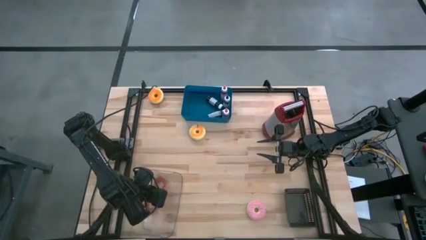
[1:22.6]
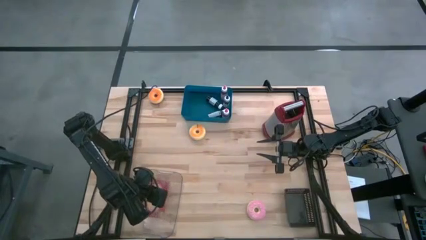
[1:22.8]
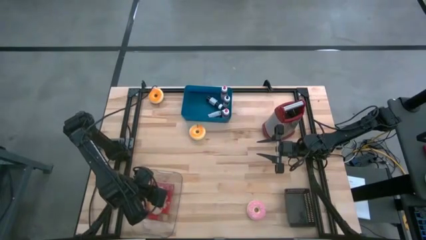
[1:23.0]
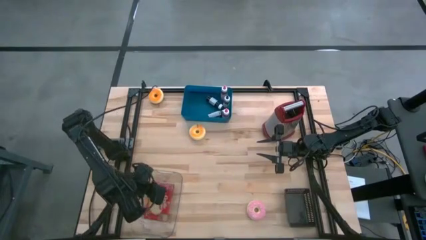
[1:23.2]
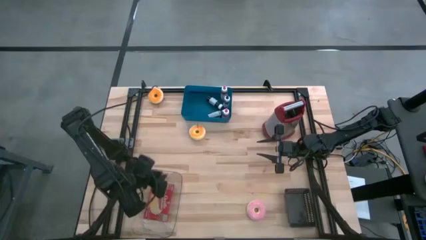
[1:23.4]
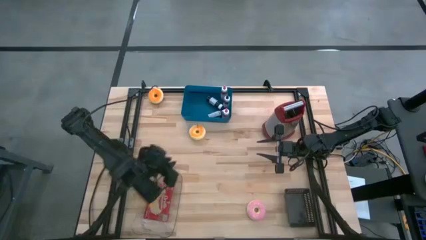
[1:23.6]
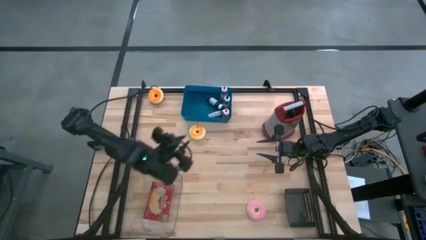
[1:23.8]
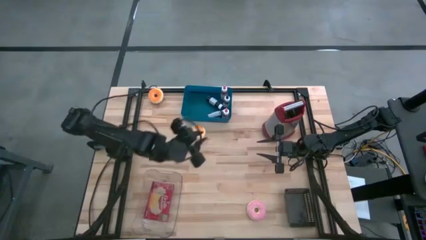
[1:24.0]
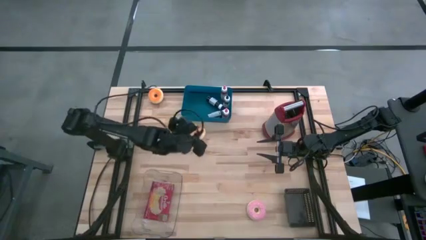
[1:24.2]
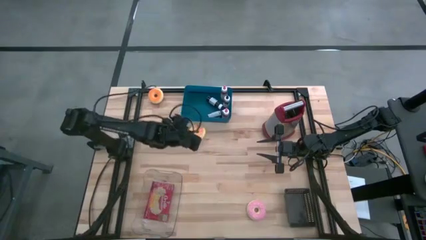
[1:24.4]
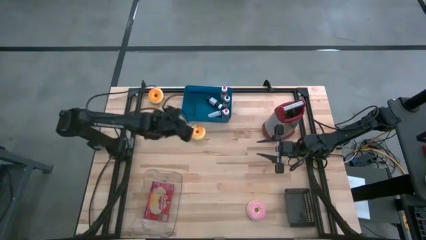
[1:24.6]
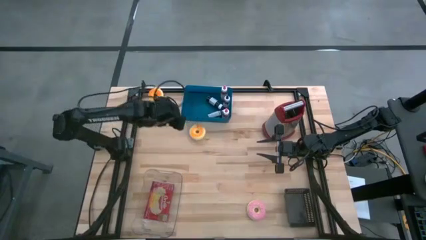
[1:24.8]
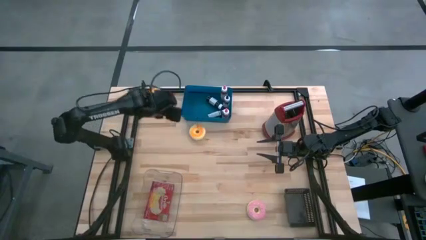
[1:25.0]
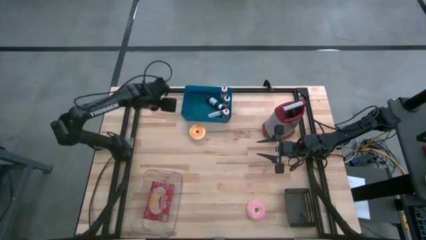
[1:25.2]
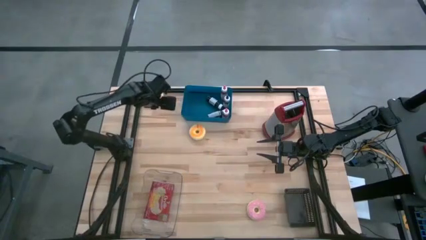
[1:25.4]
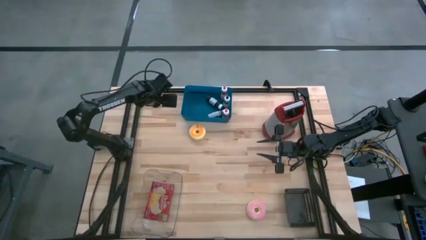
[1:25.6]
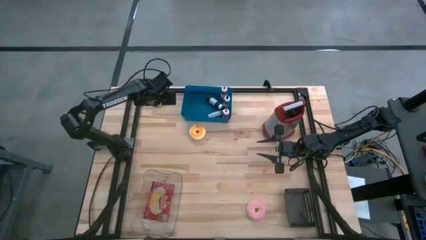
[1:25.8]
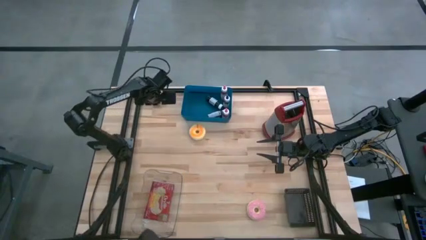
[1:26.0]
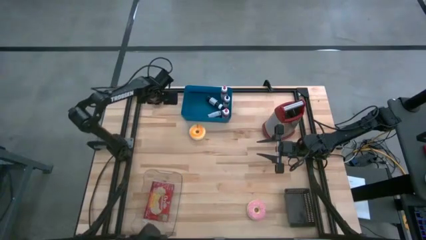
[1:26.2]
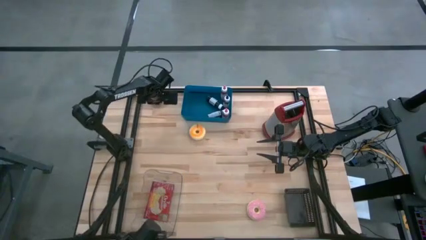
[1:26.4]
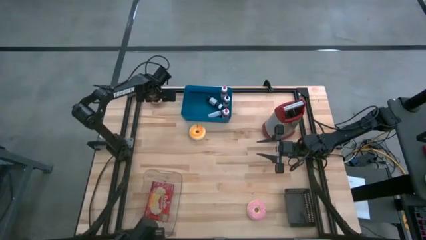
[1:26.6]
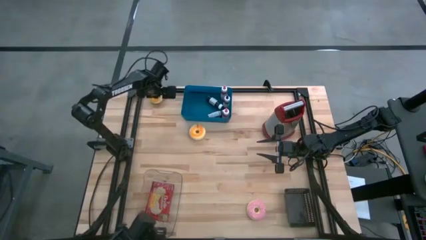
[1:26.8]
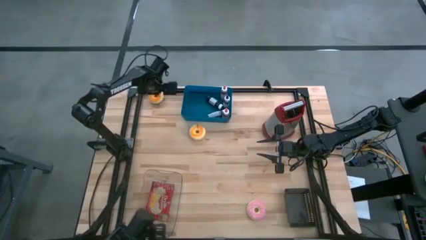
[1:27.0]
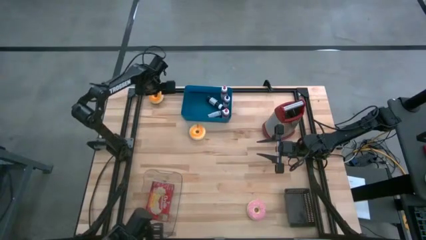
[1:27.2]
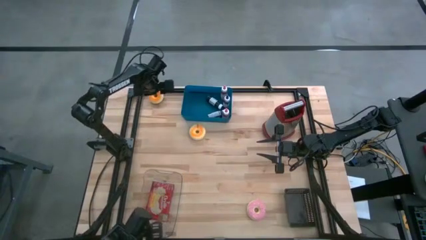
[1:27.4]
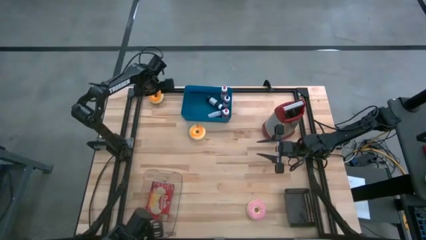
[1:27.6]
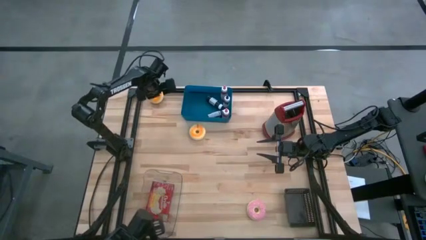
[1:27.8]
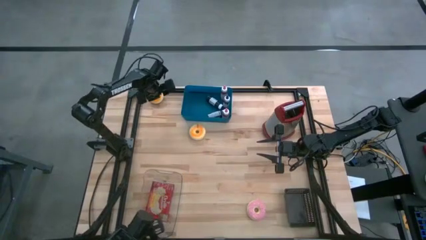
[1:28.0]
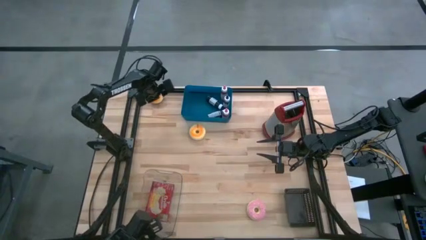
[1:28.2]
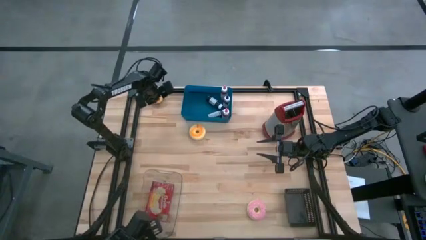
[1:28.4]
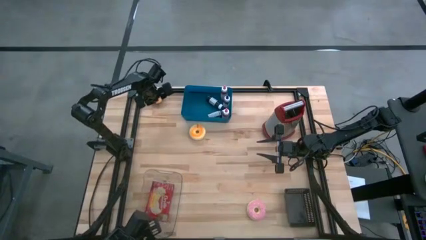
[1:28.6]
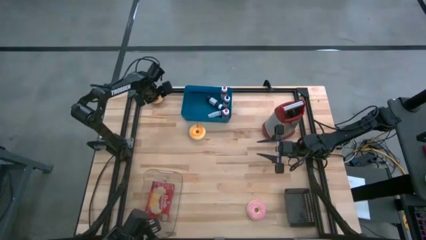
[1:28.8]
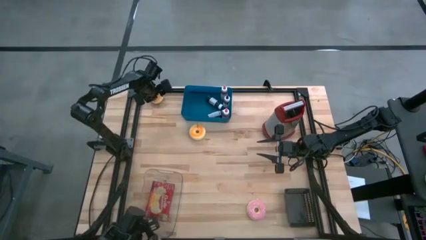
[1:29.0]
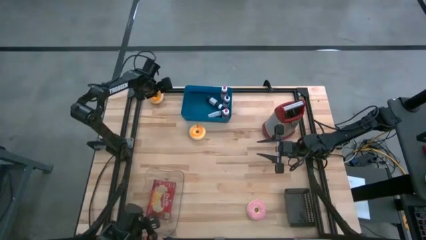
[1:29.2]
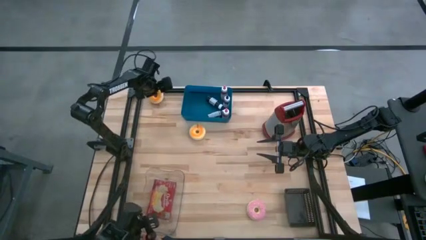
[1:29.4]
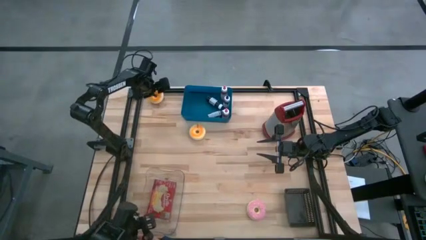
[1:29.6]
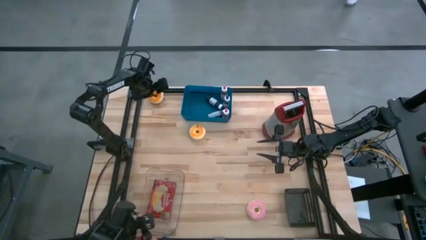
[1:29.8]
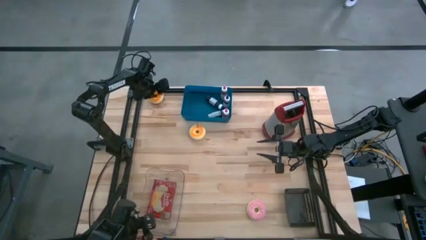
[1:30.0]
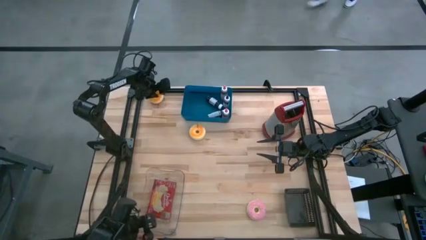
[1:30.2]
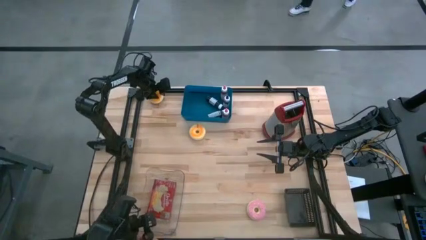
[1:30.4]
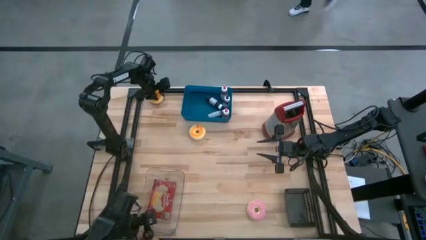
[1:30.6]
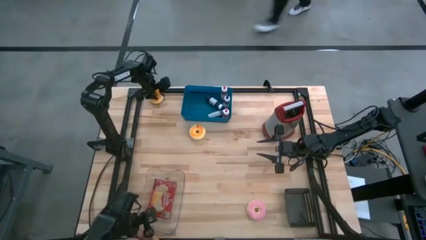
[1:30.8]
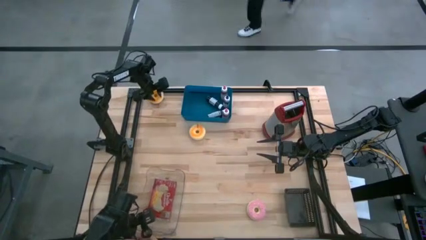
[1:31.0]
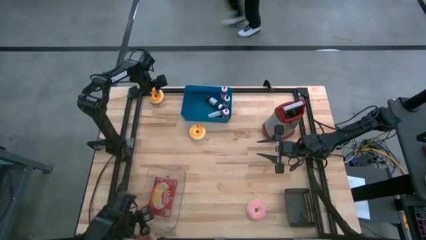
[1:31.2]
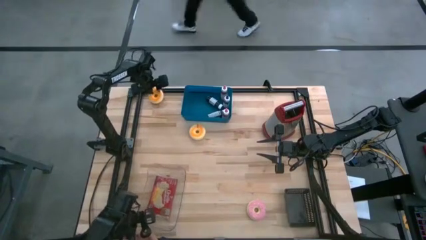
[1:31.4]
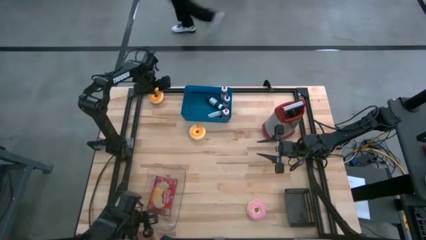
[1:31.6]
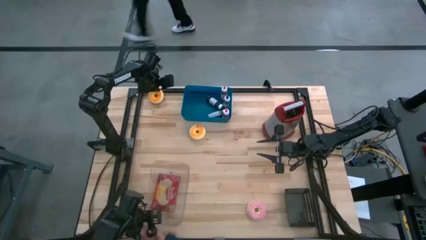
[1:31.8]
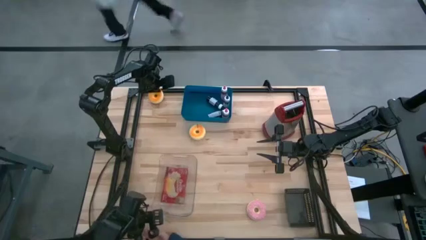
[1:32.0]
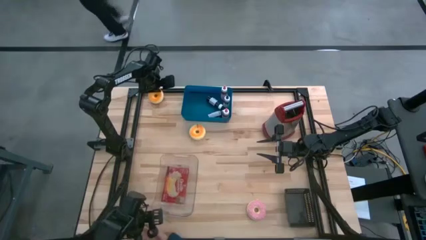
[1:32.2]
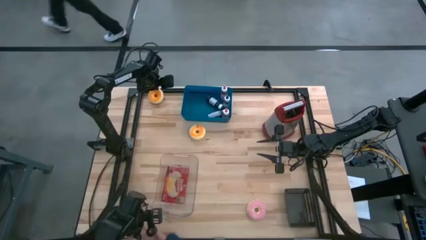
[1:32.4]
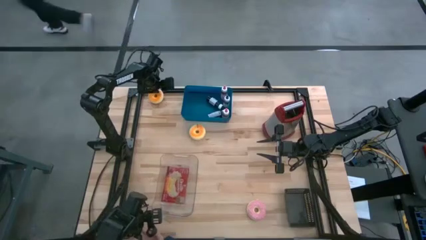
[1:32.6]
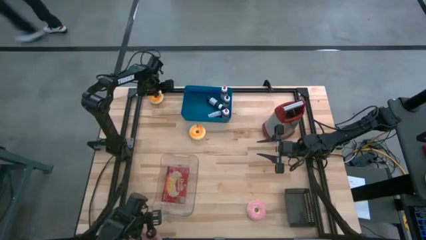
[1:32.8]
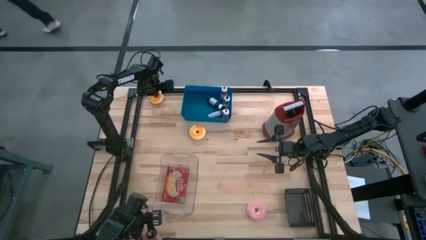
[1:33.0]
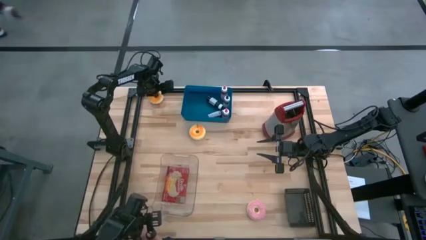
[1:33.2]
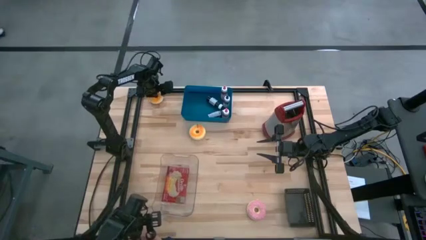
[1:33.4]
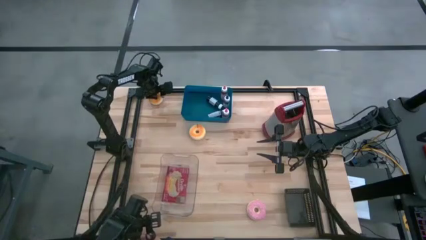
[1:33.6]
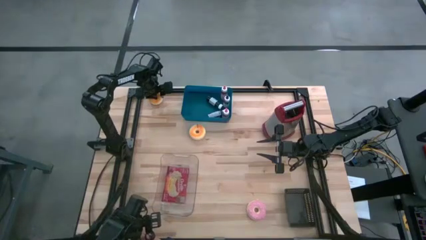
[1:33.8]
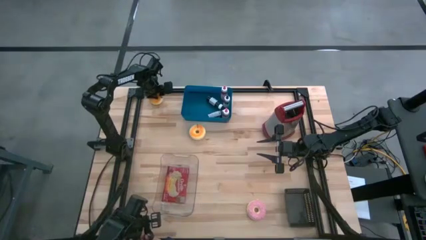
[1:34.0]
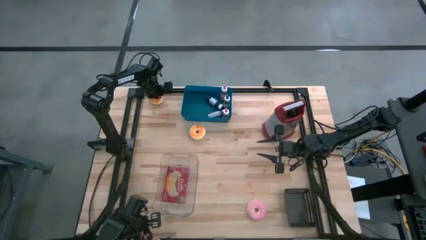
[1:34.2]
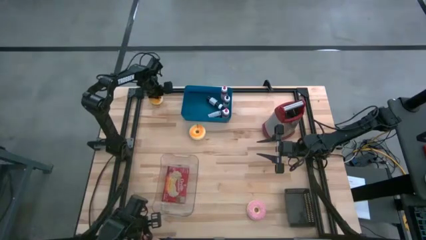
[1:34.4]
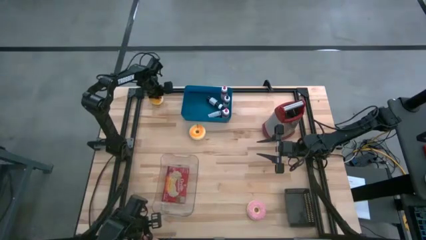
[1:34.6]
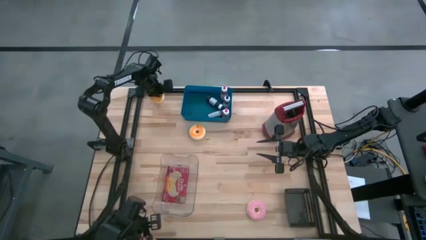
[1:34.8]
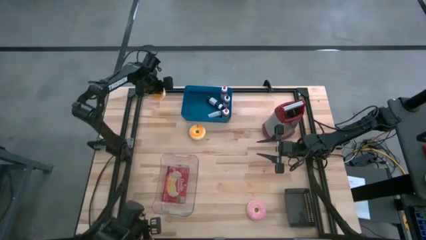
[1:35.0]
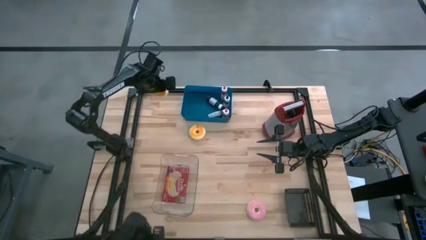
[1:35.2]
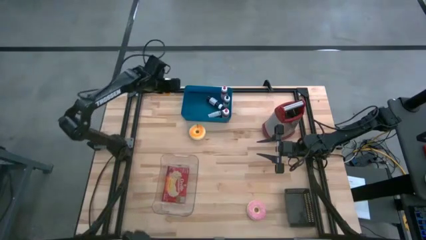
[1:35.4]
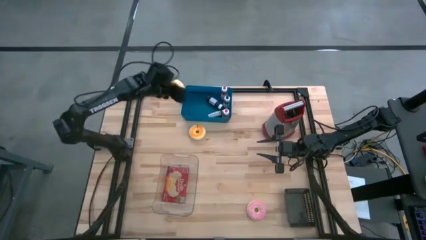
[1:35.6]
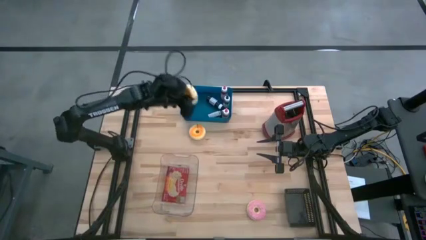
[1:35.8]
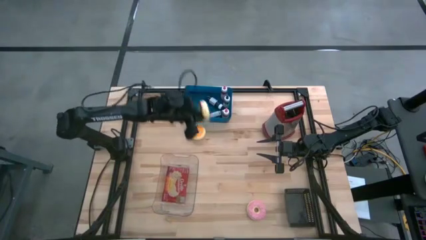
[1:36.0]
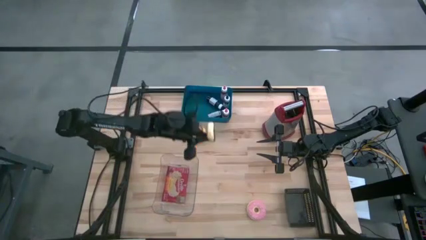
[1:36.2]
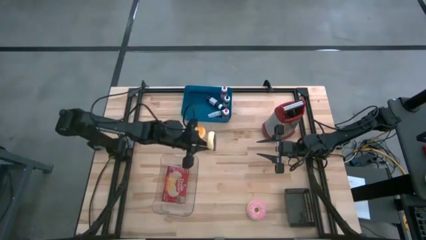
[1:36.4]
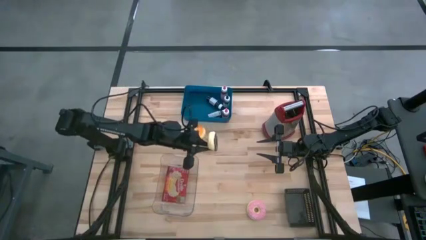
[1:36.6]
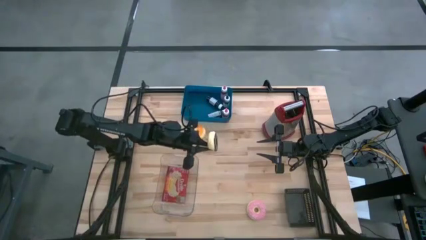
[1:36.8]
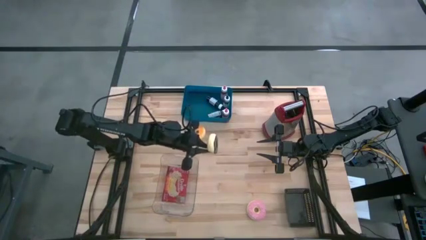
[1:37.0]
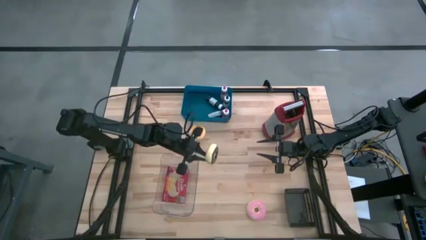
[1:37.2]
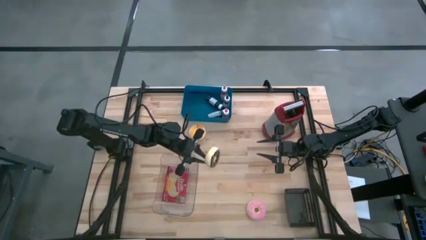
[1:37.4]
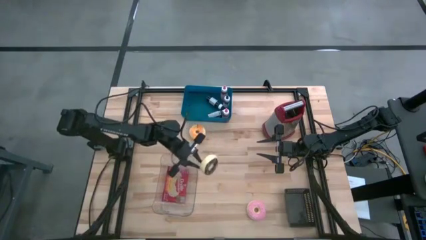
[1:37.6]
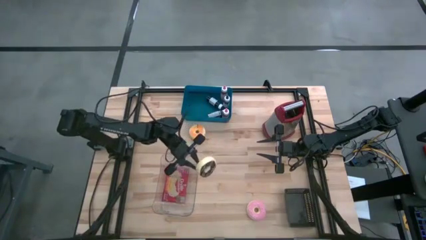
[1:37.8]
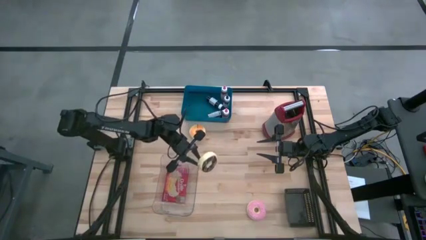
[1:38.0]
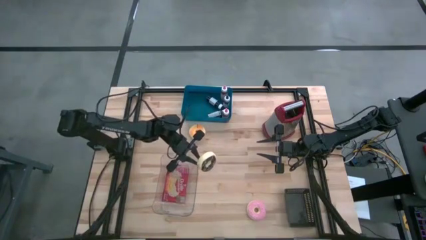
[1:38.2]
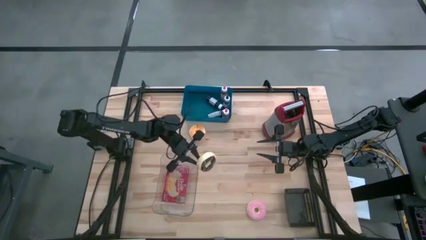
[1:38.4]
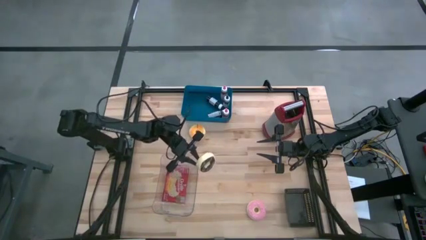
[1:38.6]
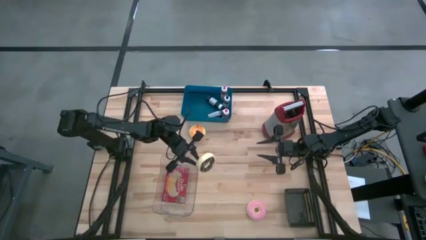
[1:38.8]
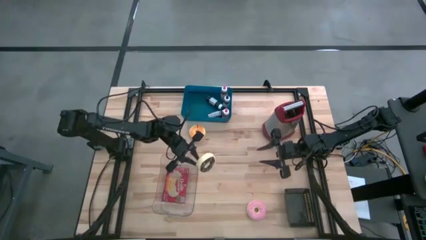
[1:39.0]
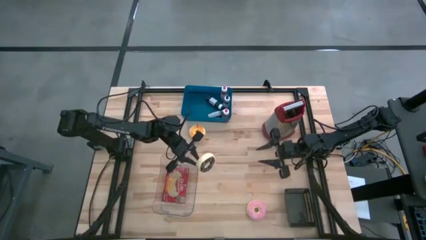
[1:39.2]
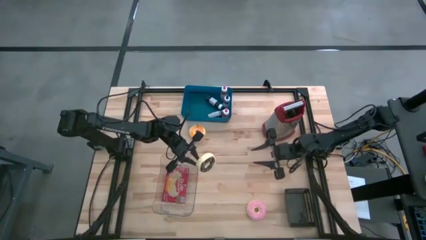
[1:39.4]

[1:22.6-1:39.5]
Task: Pick & Place Food Item
Put the top yellow black donut into the black bin
